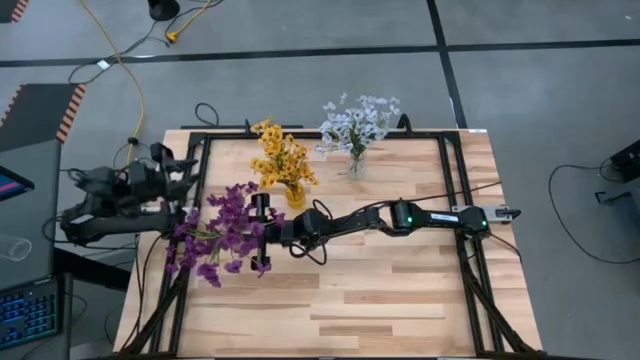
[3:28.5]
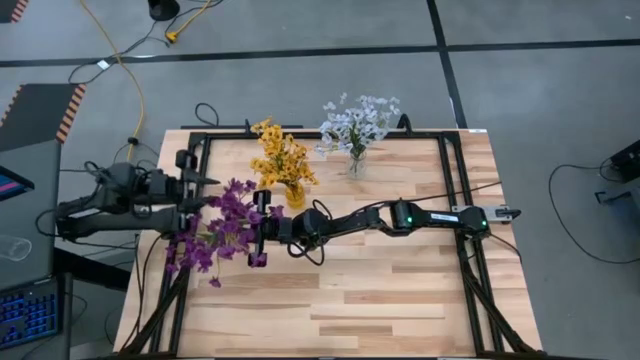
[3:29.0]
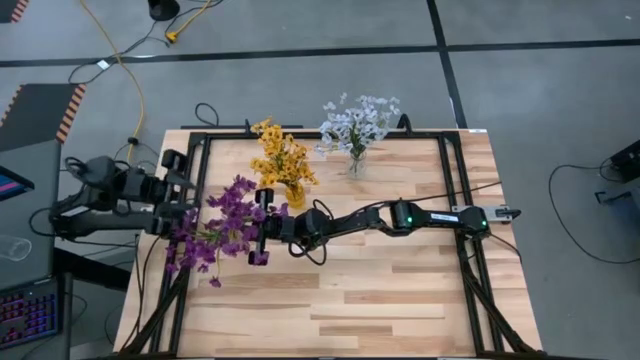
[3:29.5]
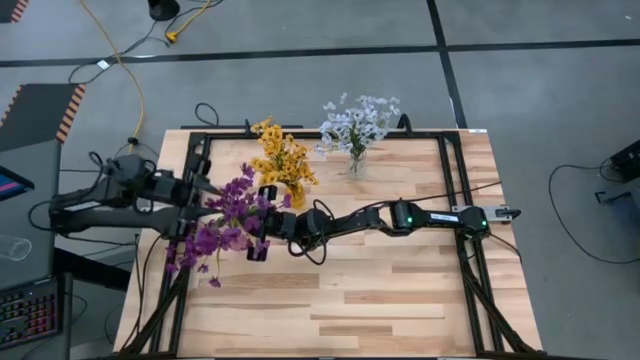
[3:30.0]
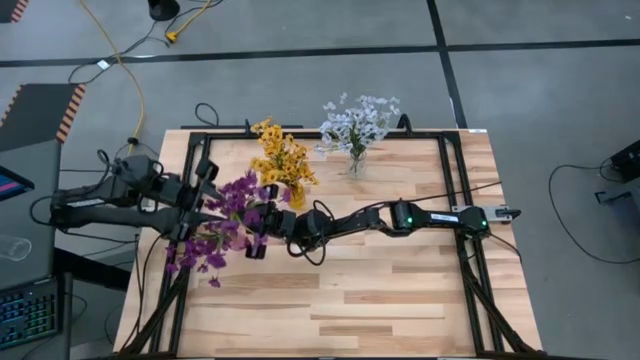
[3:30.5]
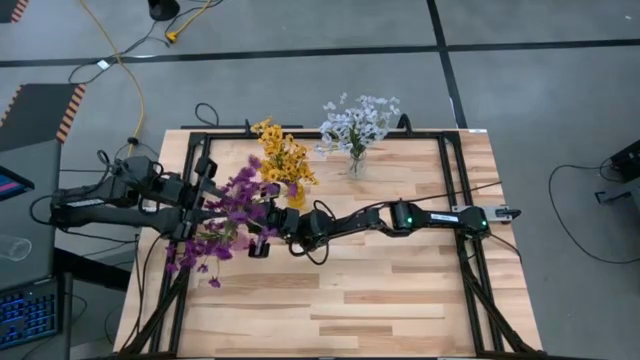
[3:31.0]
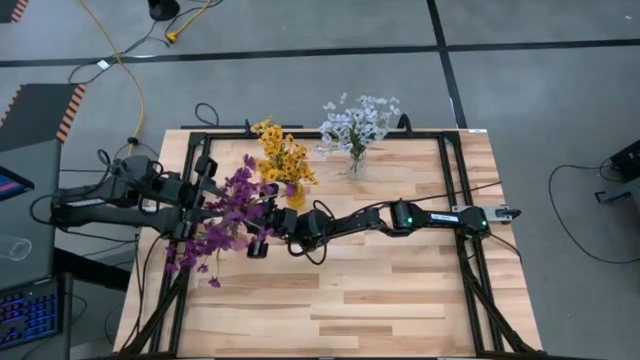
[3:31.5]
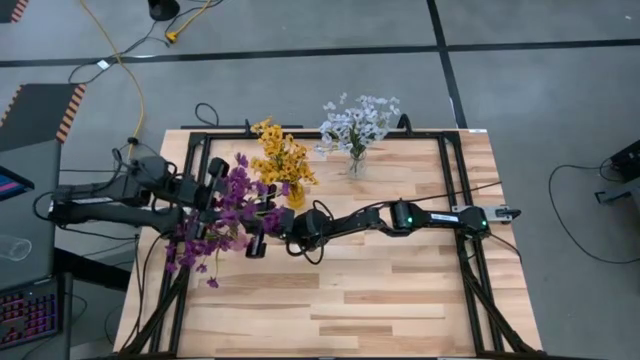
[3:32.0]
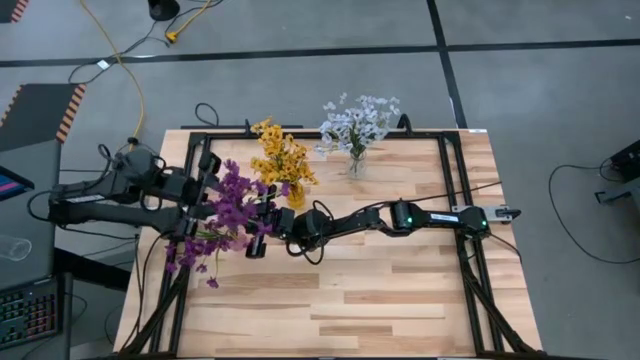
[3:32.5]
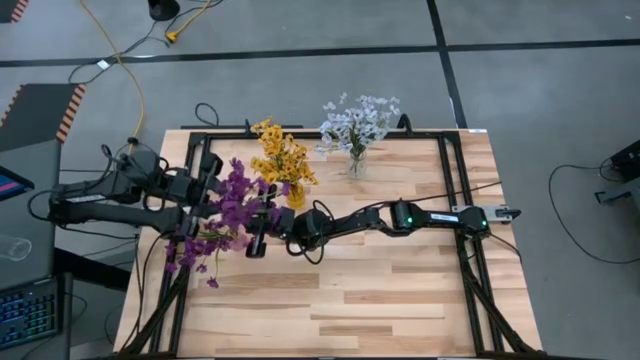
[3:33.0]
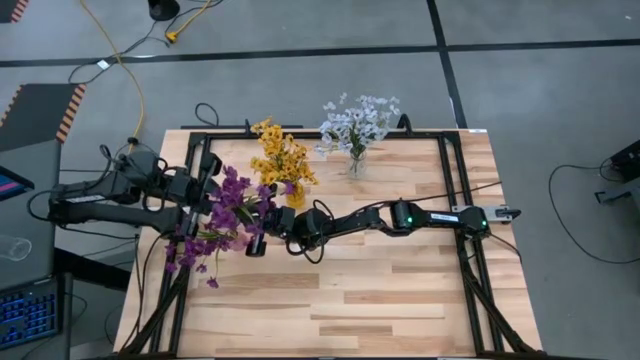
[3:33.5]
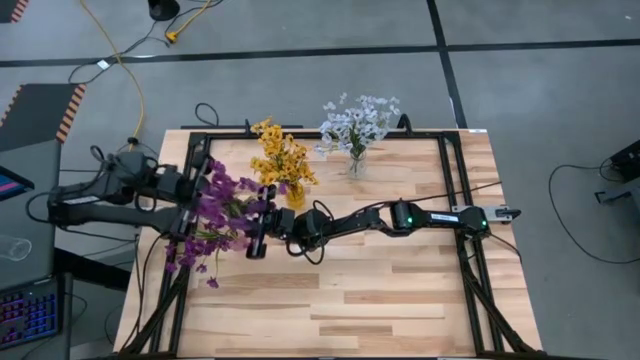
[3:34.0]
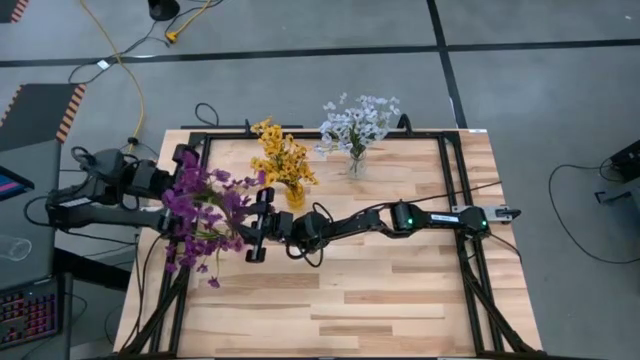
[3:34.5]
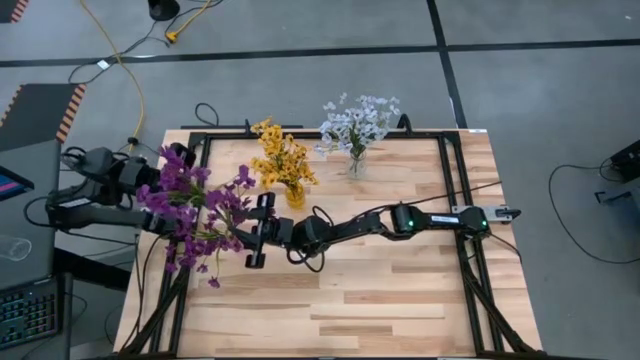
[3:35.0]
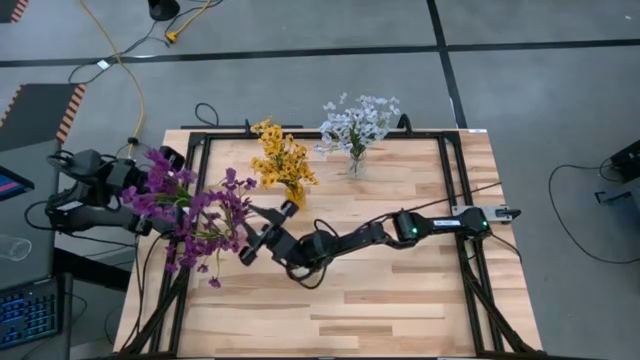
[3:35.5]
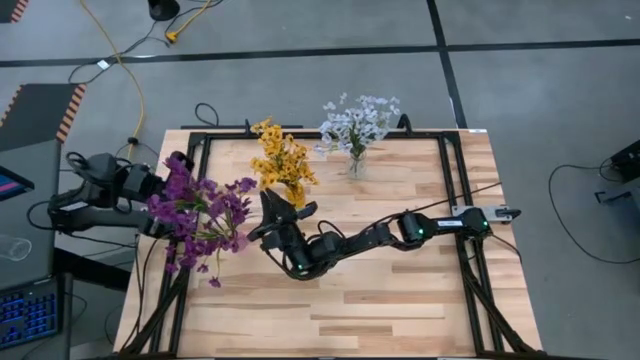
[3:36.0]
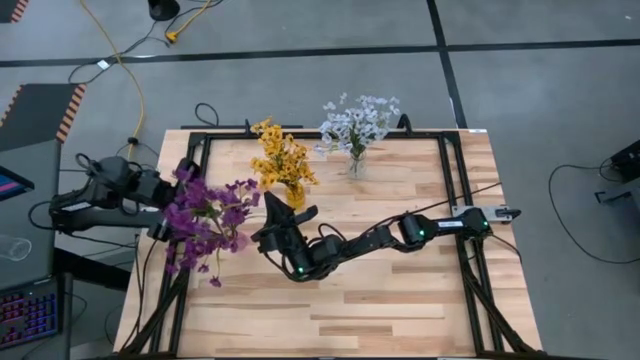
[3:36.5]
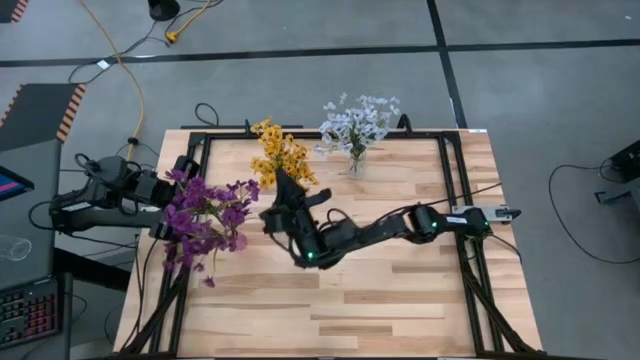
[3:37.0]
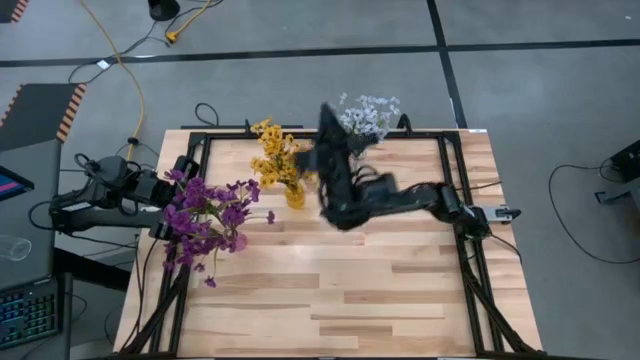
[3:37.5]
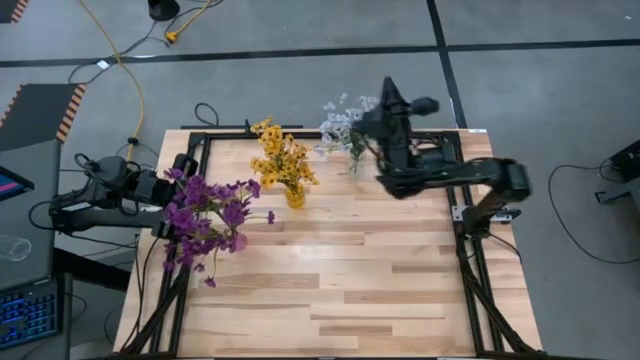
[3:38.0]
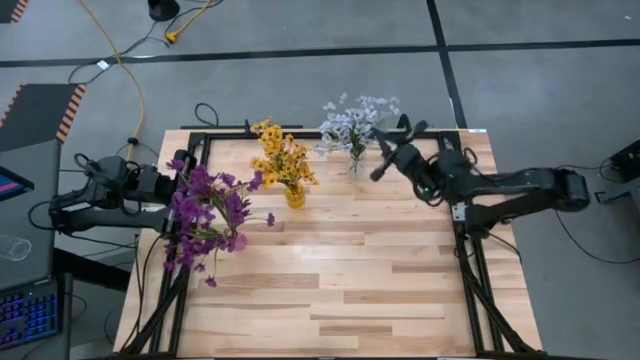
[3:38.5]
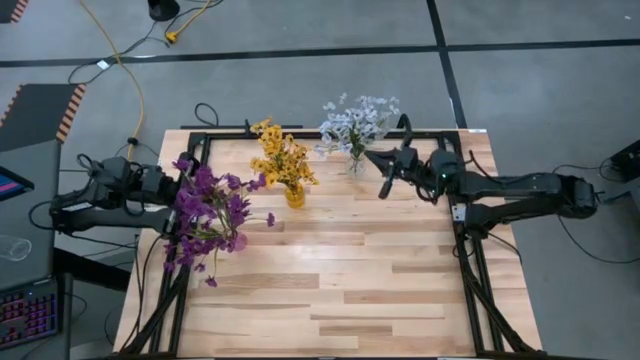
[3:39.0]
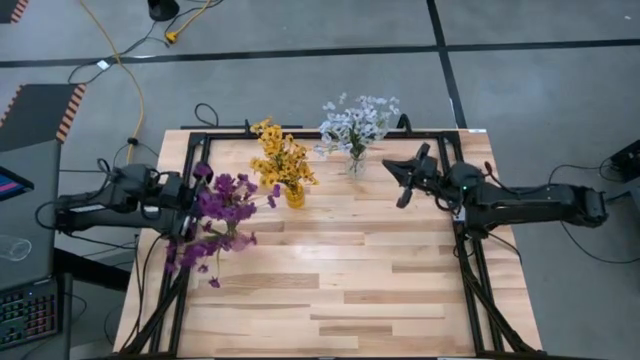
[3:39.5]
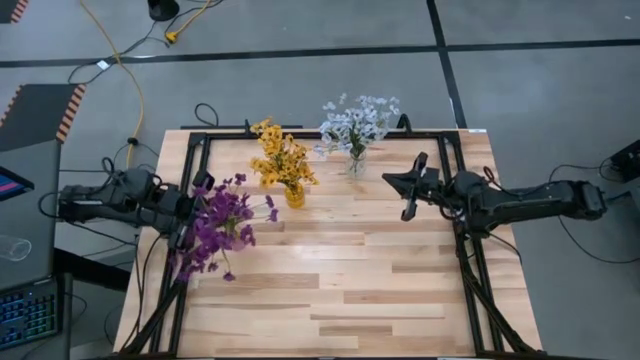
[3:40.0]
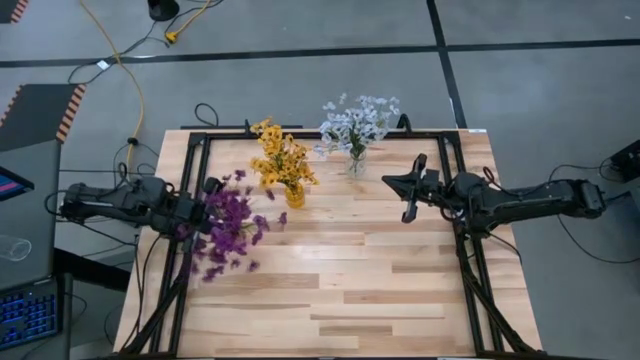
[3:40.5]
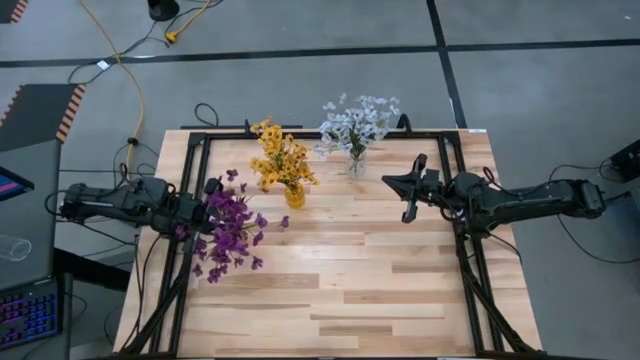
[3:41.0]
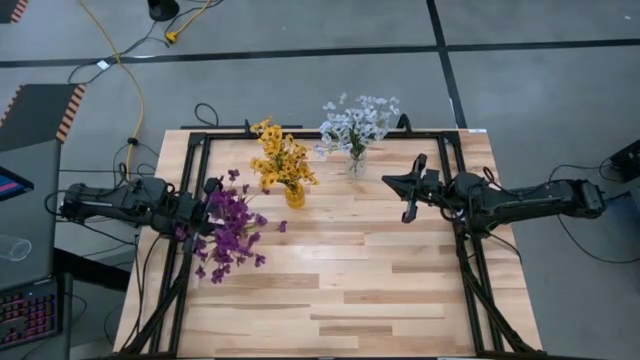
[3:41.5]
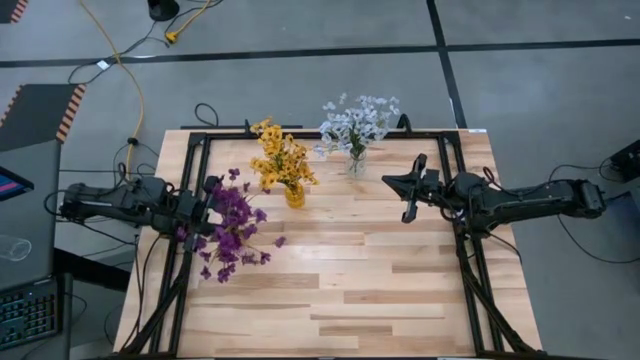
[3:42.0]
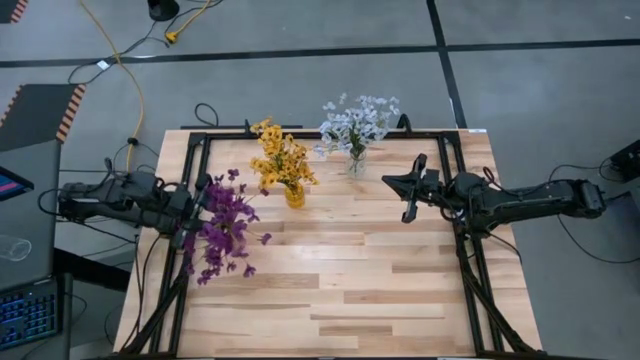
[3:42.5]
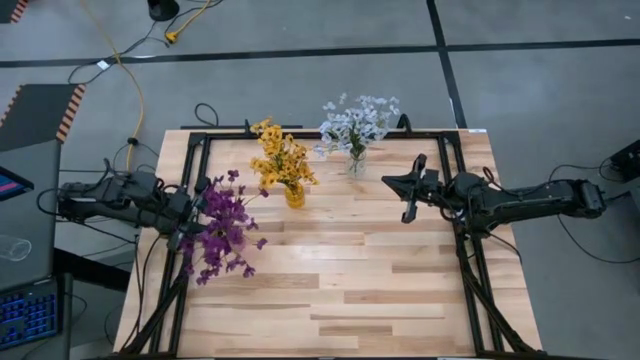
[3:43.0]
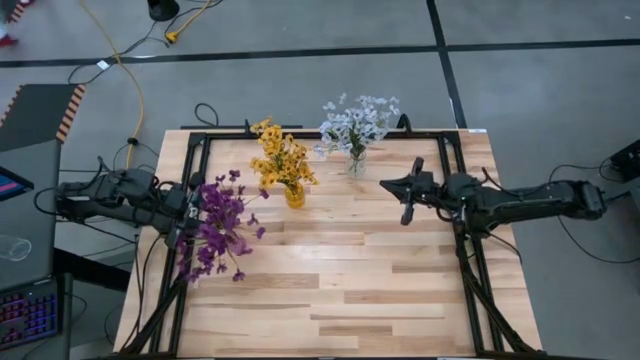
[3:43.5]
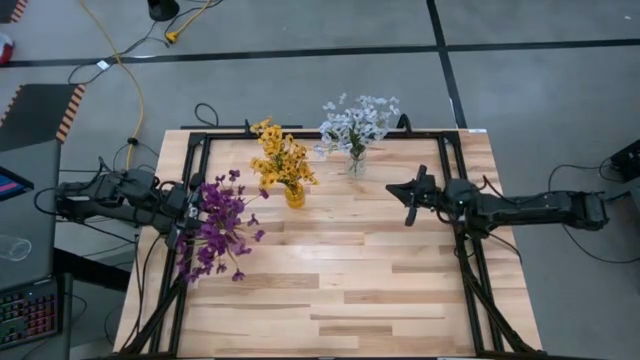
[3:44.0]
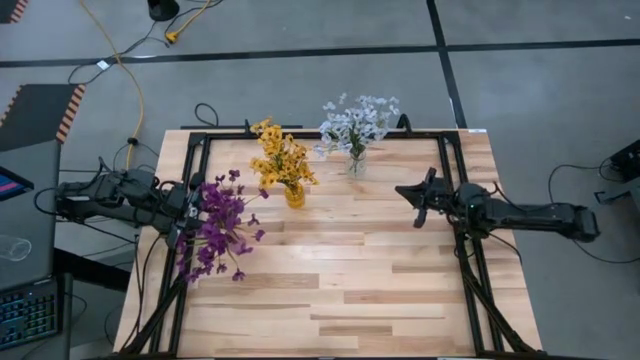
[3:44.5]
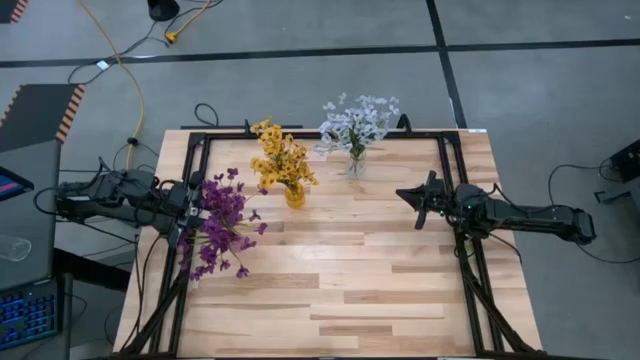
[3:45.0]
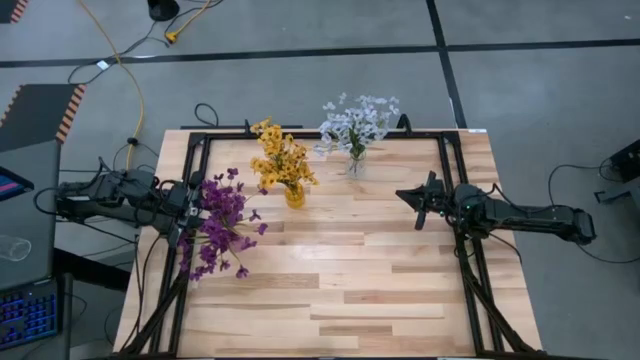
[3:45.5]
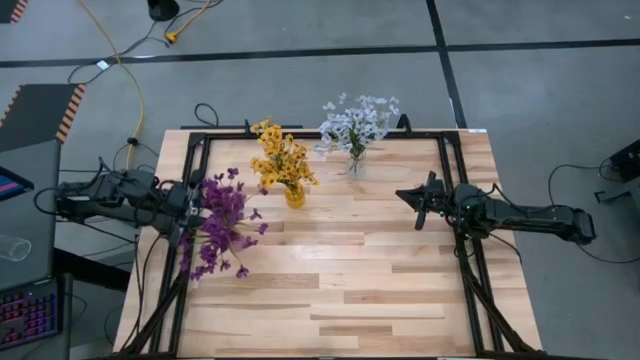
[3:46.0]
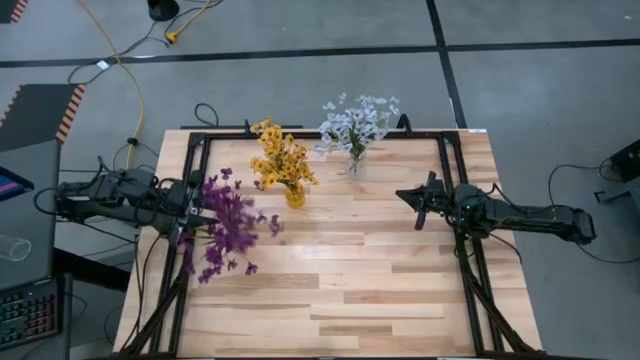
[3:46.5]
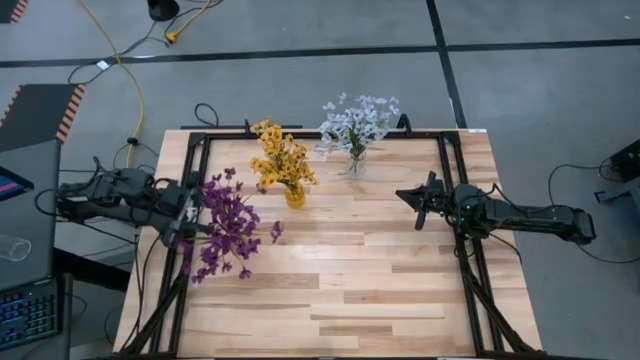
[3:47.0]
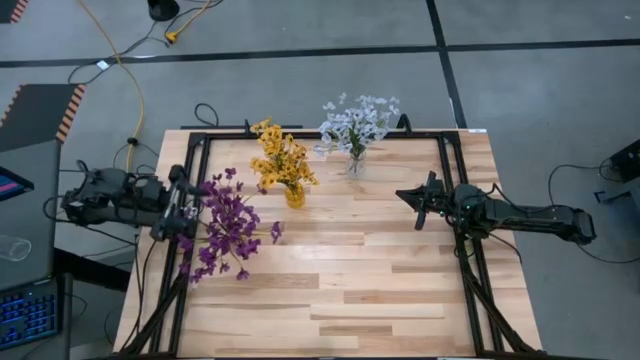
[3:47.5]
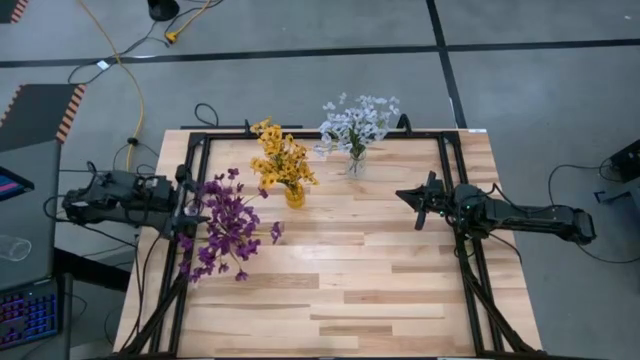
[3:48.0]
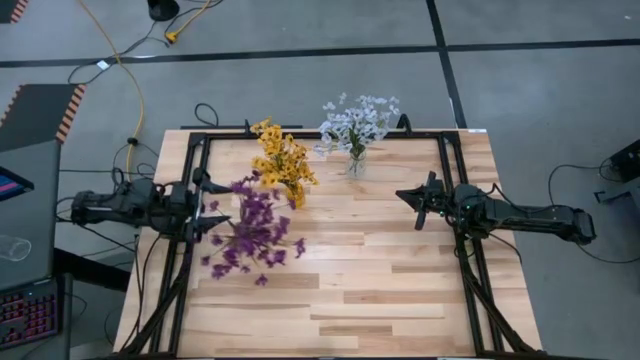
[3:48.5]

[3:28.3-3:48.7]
Task: Sort flowers into vase by color
Put the violet flowers into the violet vase
